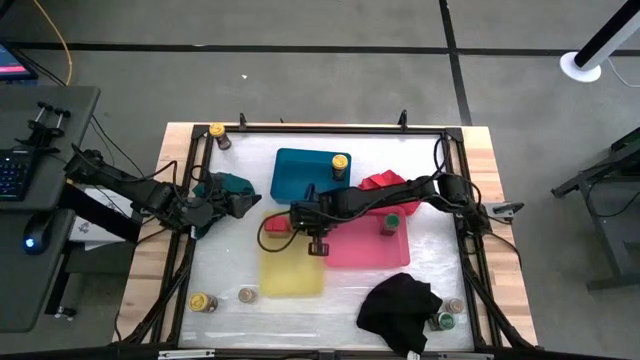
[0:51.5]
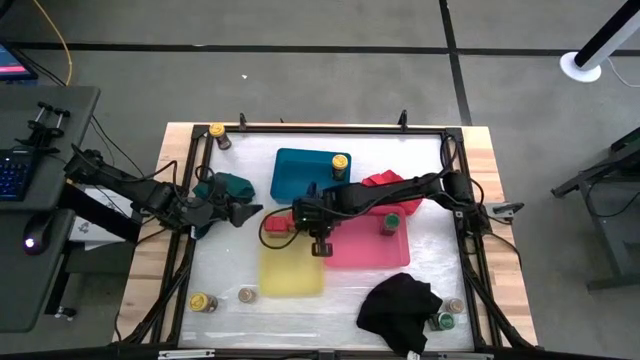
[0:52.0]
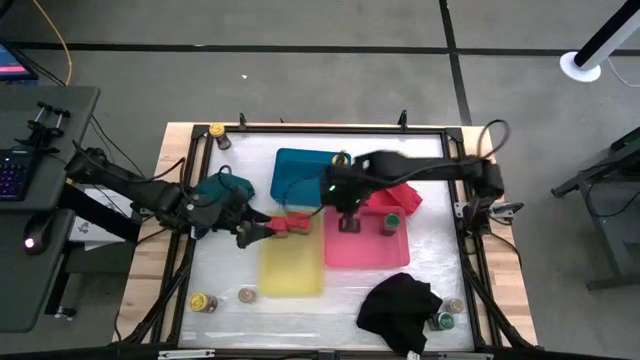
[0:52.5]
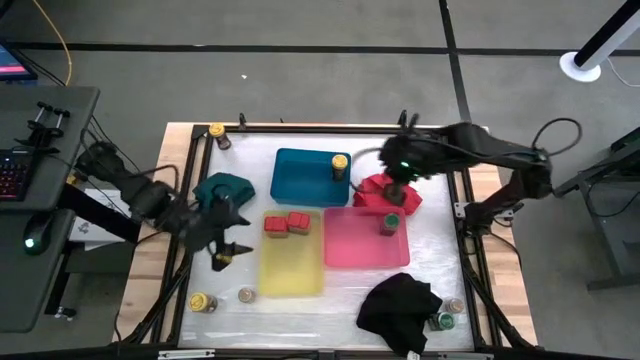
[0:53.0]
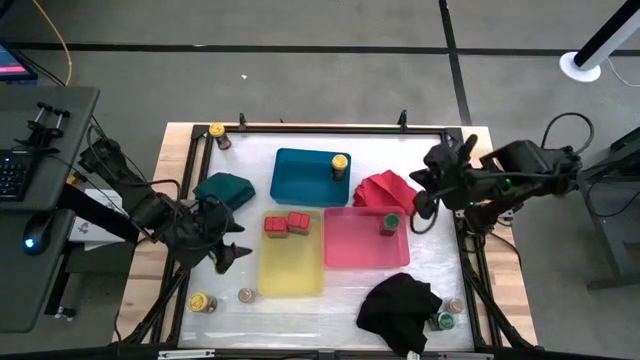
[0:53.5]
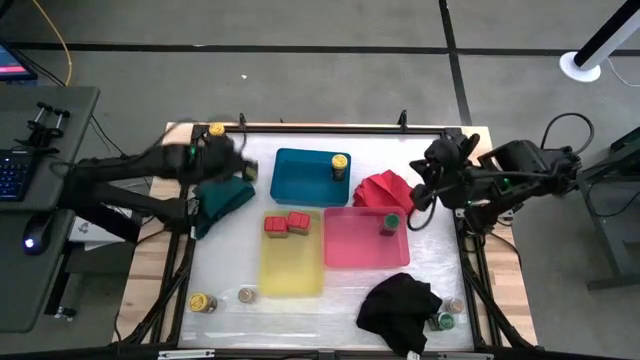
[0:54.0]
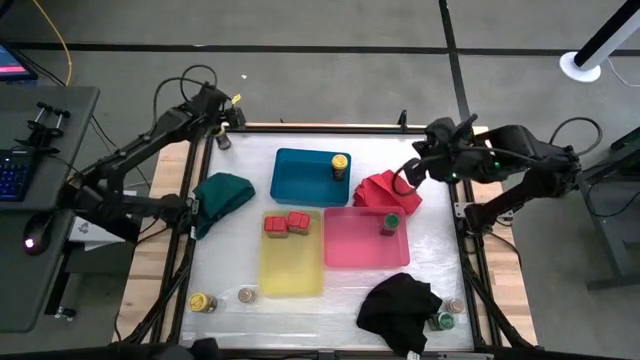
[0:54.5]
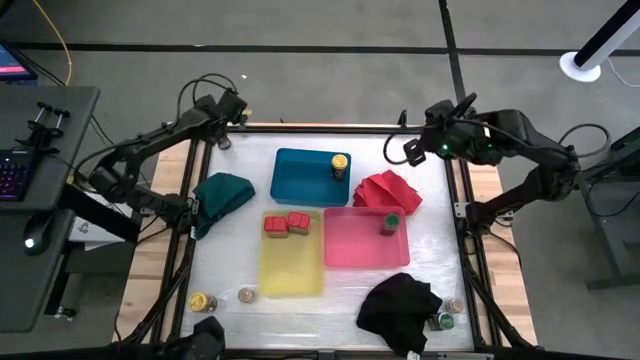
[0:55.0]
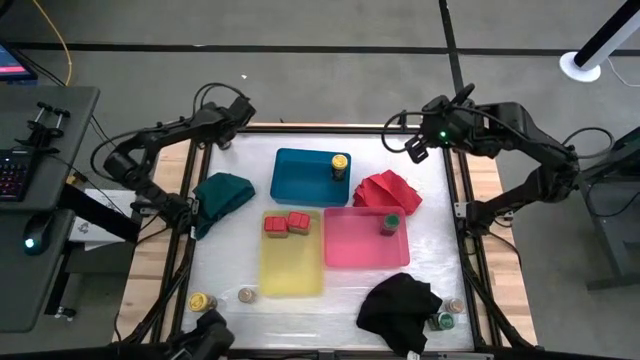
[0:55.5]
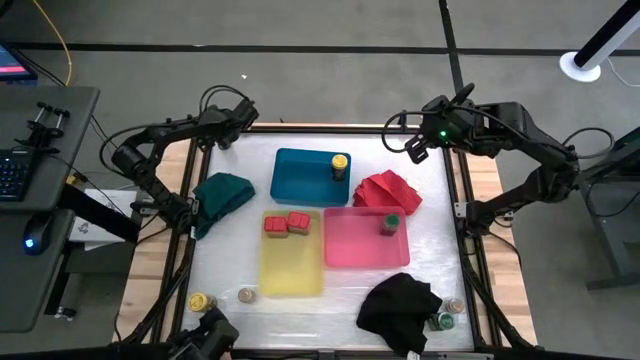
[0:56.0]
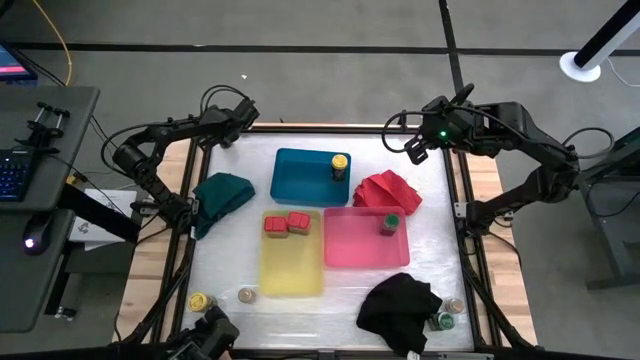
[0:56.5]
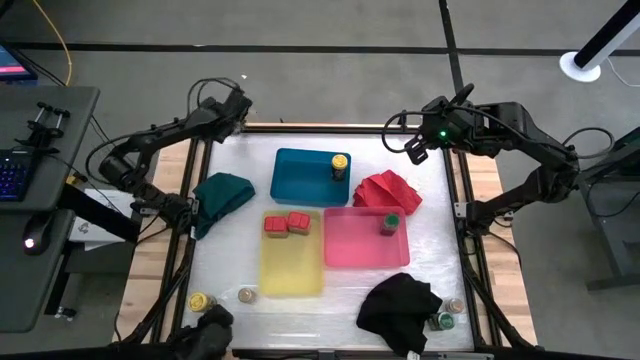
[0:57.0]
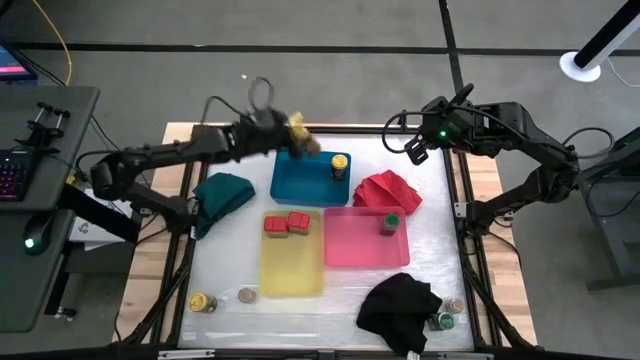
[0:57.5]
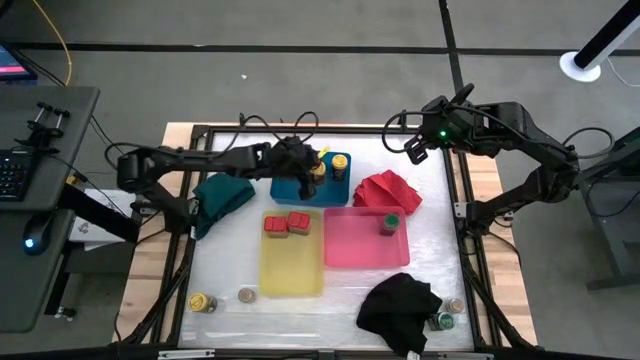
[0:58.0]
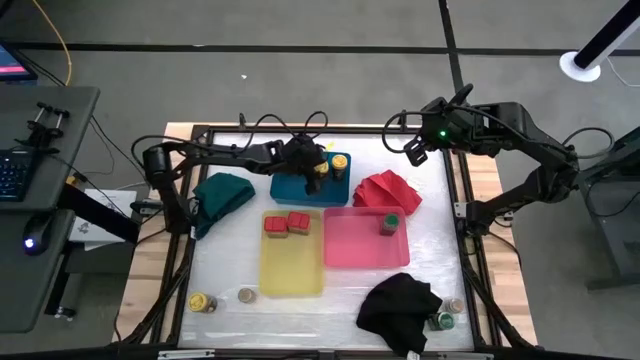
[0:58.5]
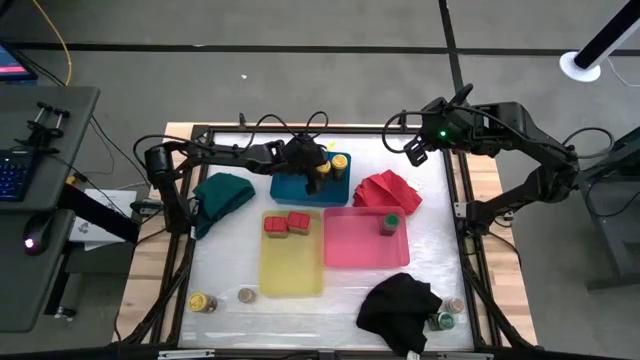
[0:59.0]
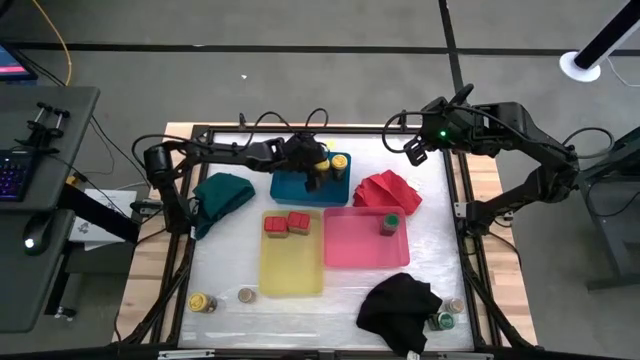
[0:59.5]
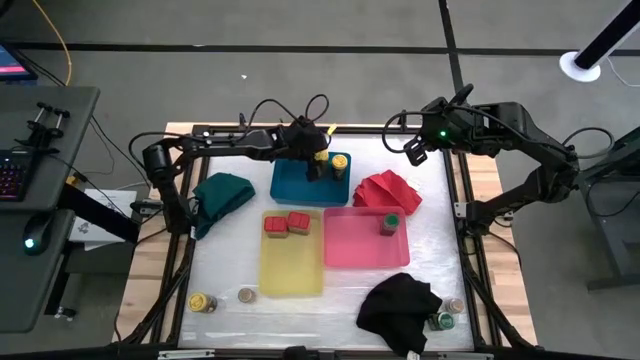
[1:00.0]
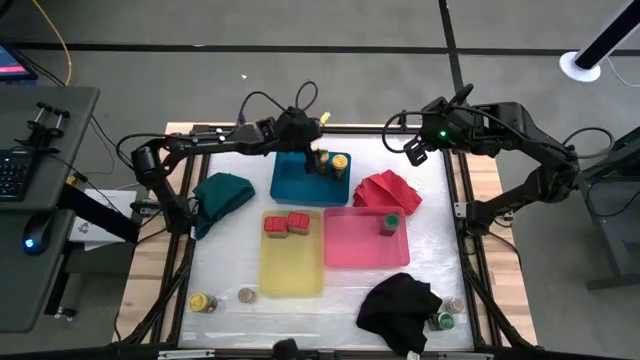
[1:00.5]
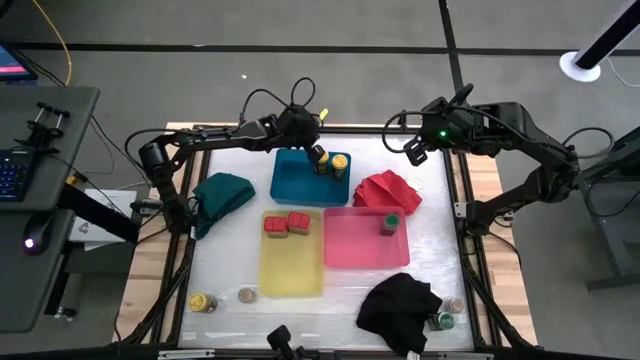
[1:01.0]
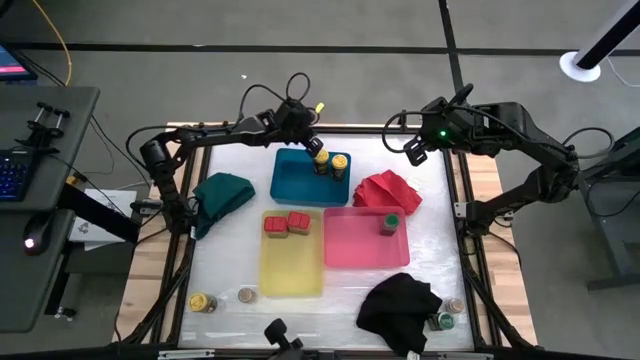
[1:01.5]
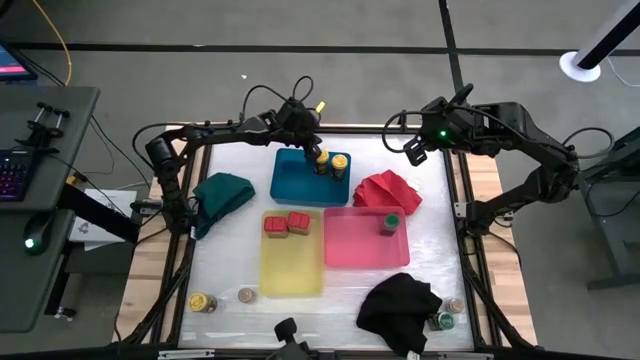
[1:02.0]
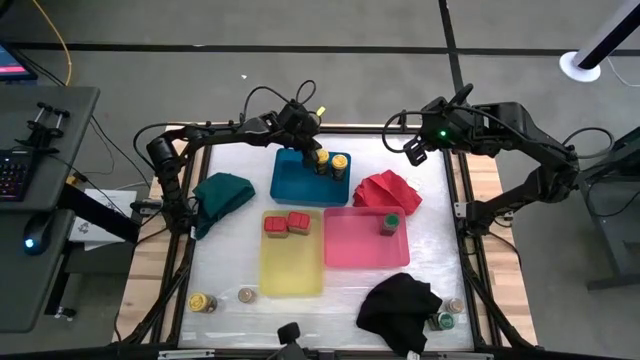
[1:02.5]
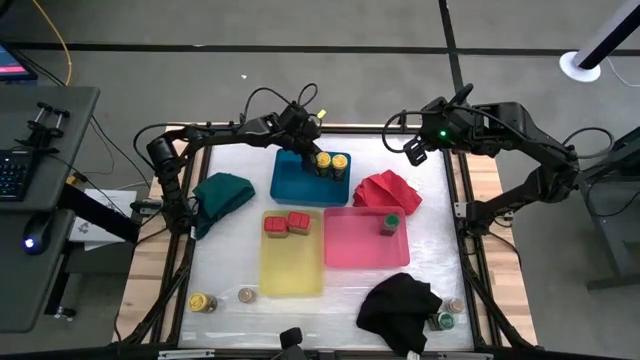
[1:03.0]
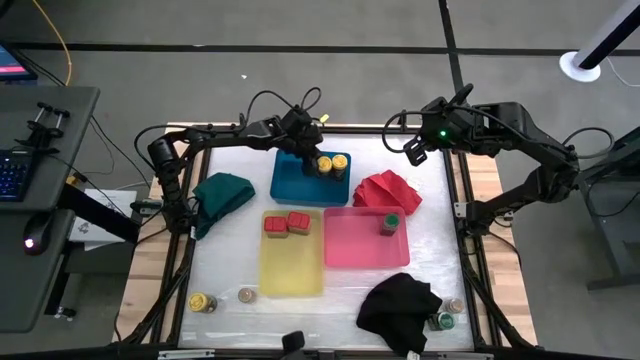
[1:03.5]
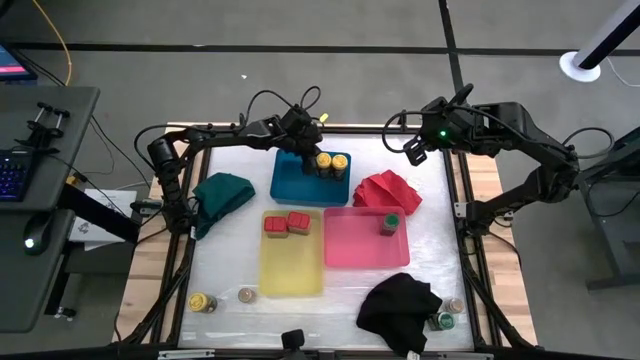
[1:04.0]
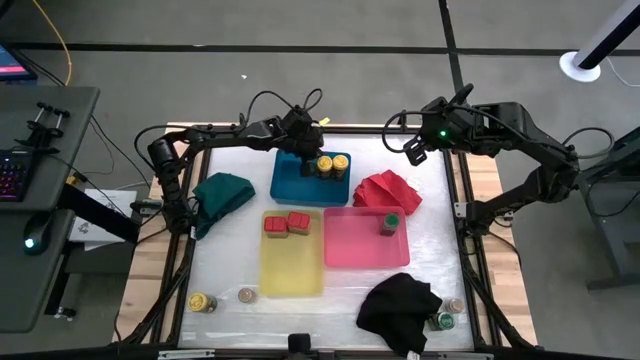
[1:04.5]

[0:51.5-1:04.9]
Task: Sort spices by type
Put the yellow spice bottle into the blue bin

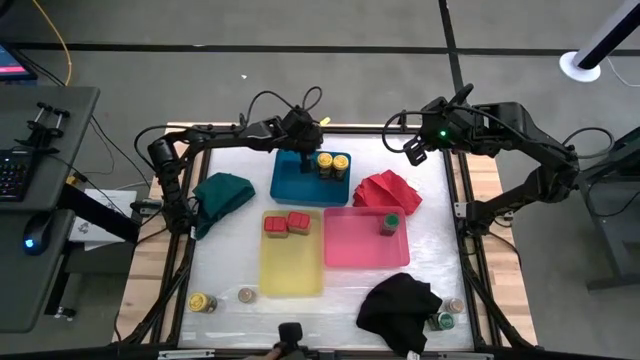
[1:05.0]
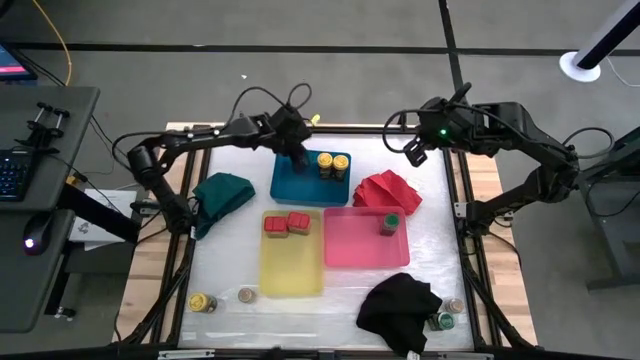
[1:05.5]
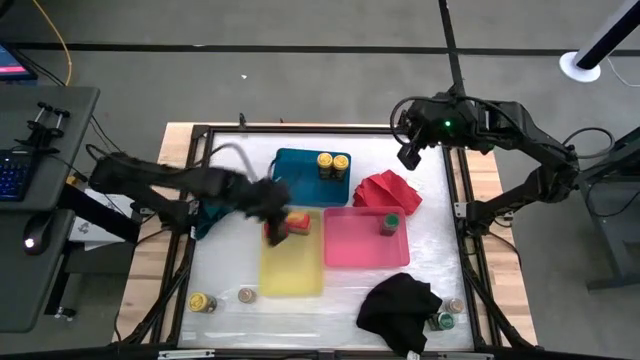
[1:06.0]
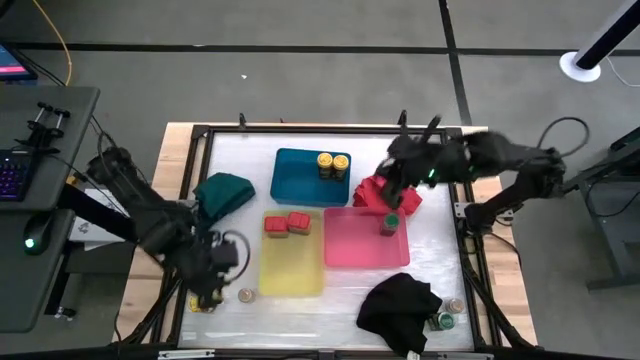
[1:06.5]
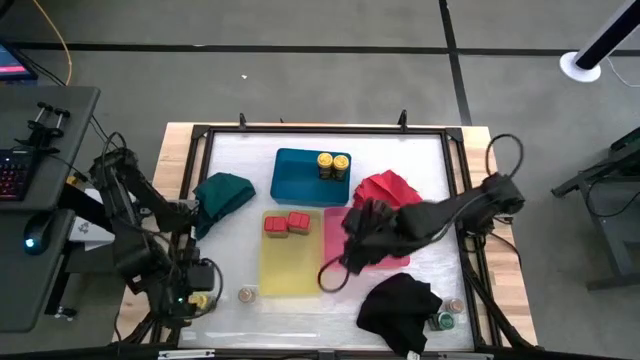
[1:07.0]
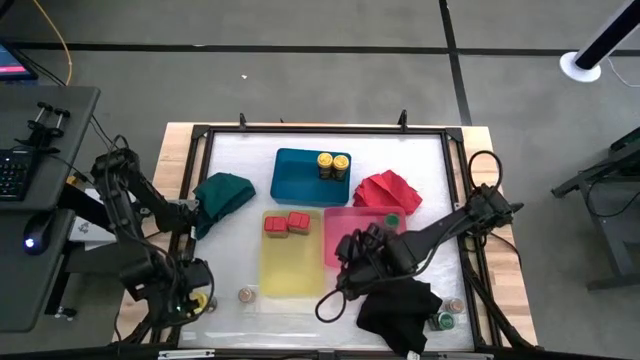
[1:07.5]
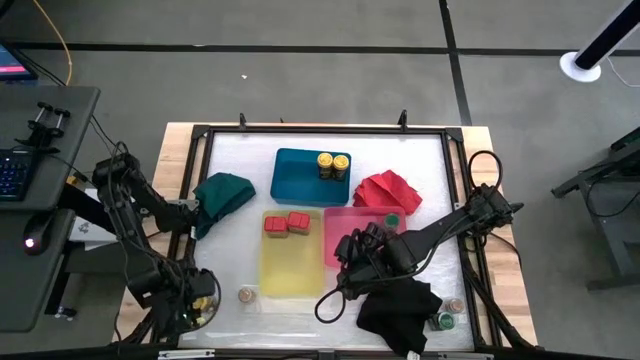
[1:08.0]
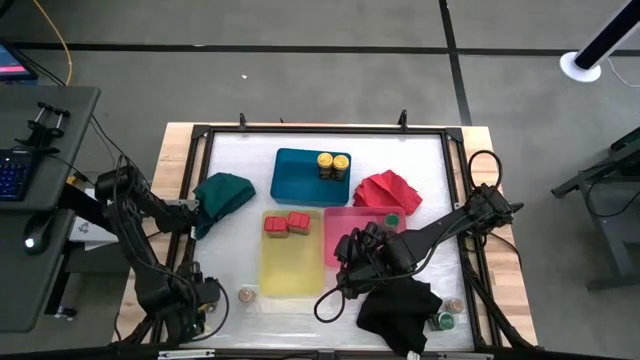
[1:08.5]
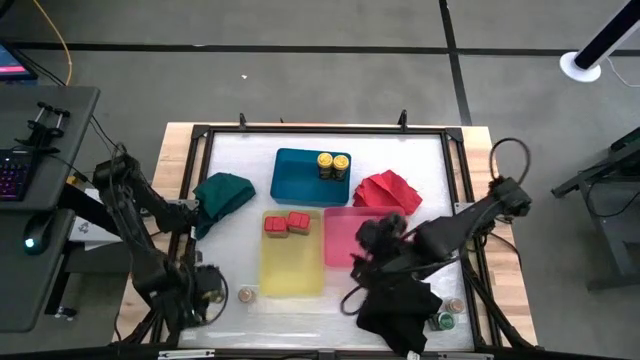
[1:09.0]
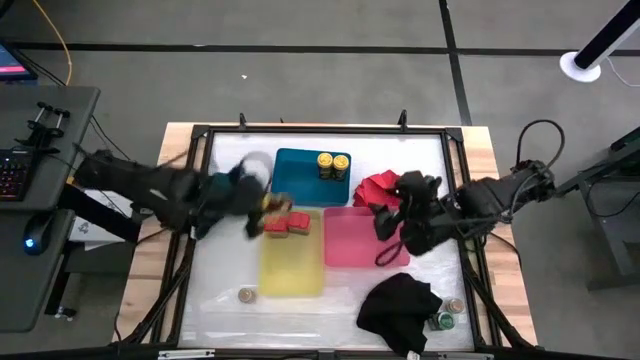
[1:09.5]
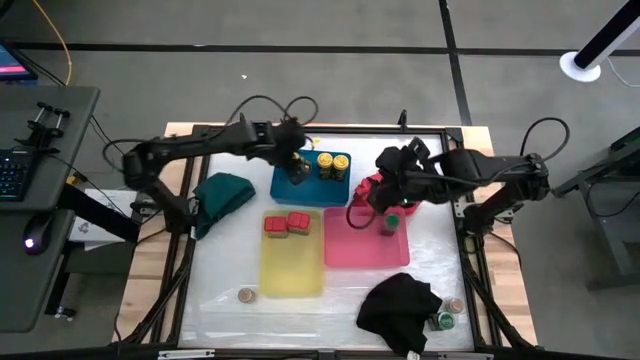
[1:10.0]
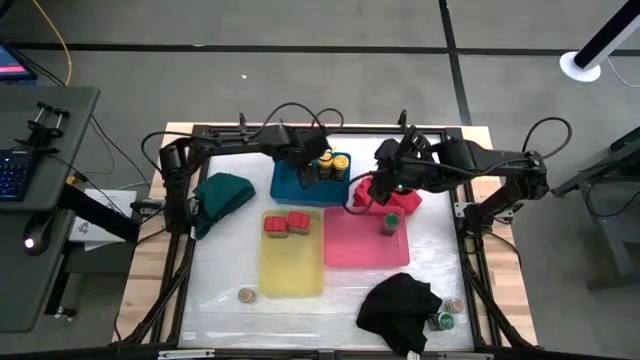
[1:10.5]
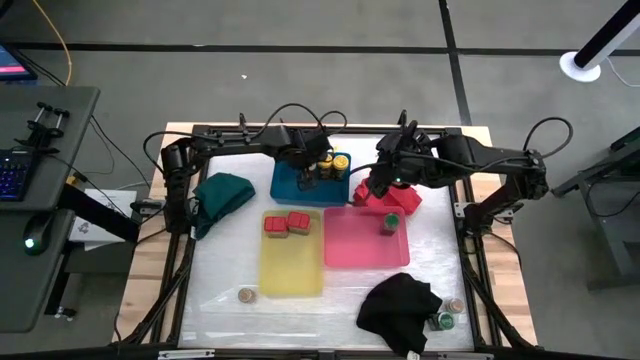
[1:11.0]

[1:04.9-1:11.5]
Put the yellow spice bottle into the blue bin
